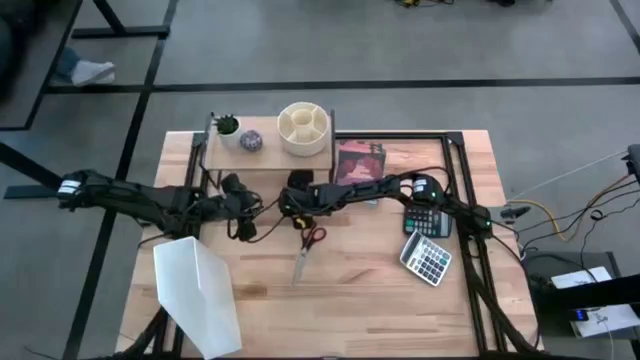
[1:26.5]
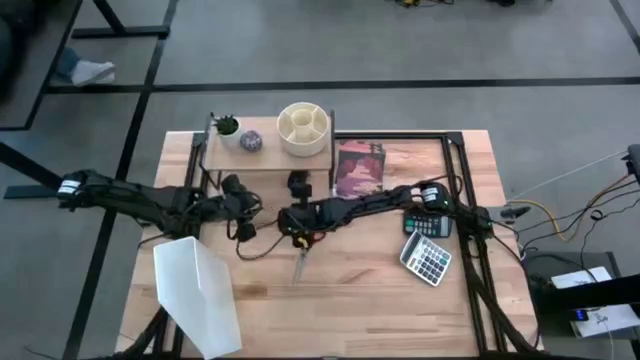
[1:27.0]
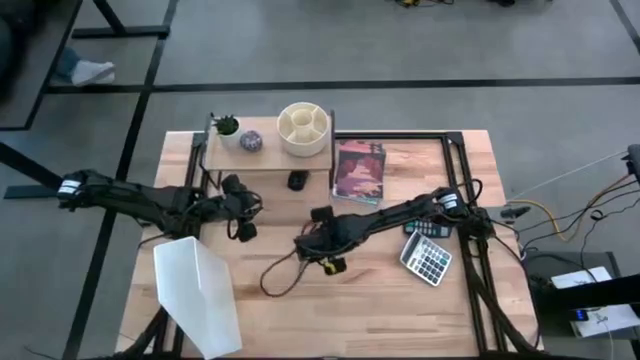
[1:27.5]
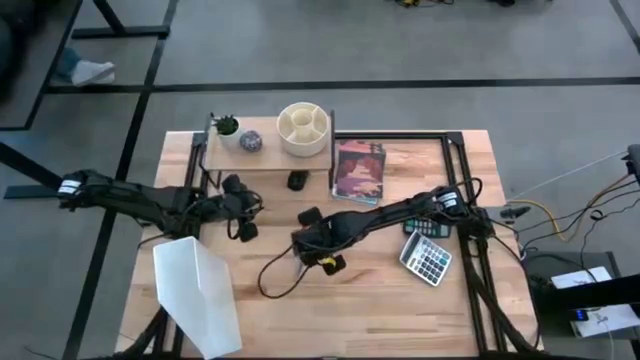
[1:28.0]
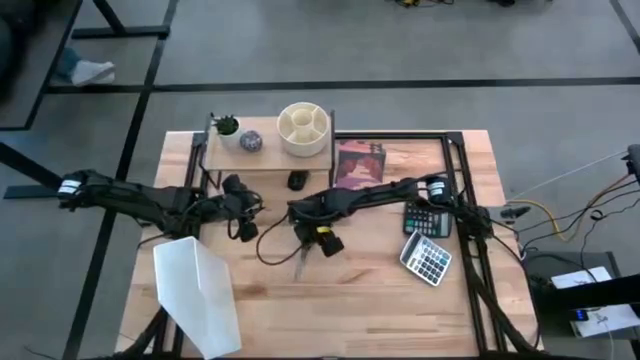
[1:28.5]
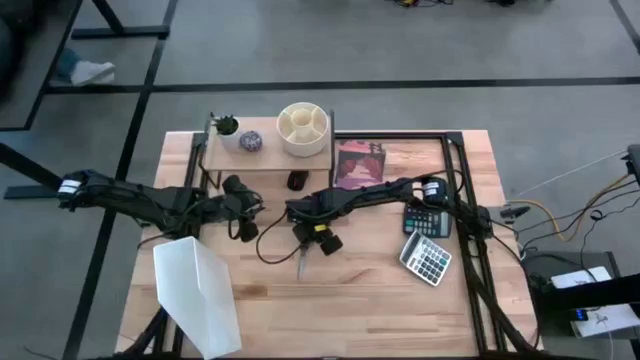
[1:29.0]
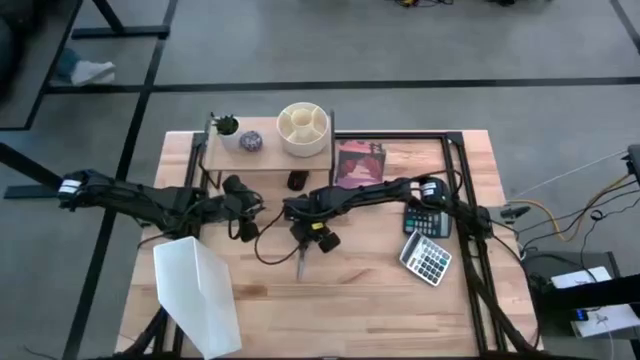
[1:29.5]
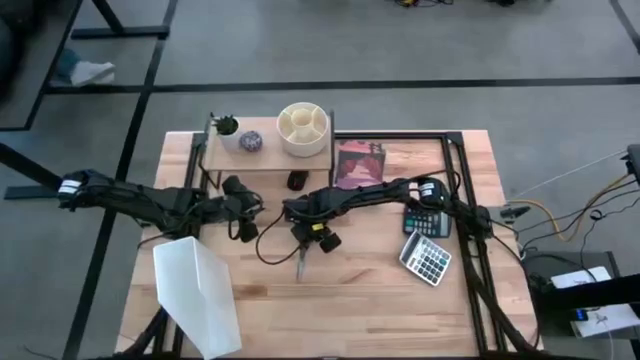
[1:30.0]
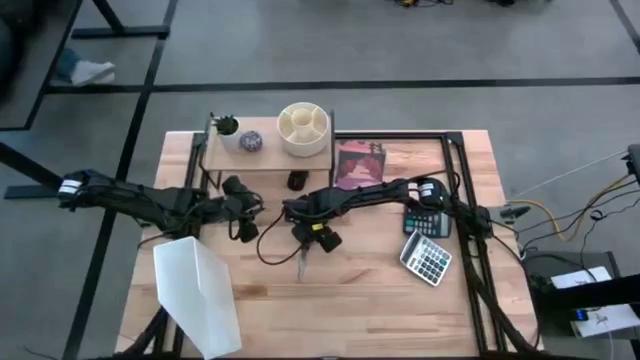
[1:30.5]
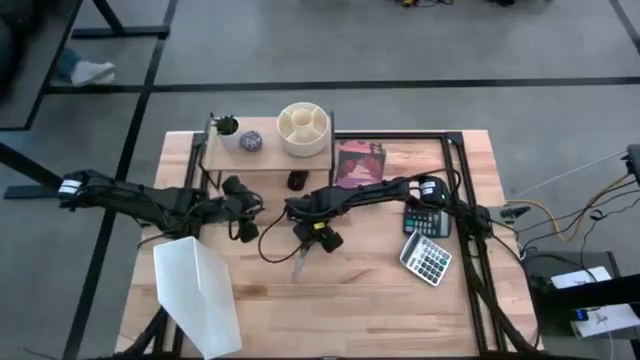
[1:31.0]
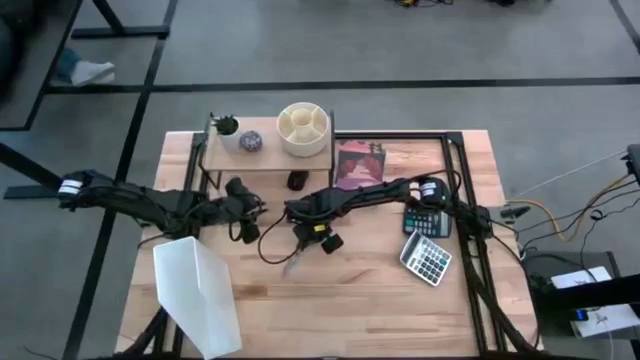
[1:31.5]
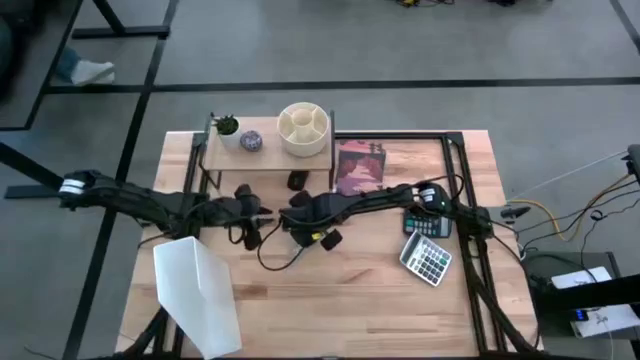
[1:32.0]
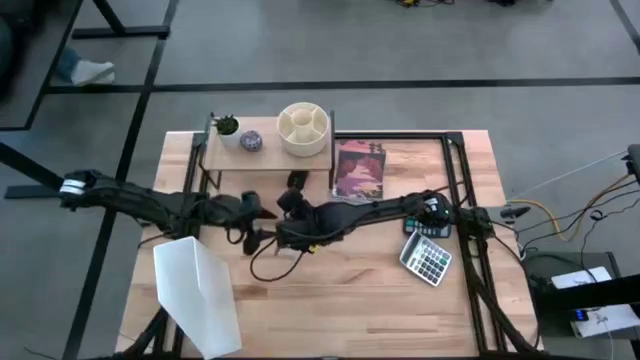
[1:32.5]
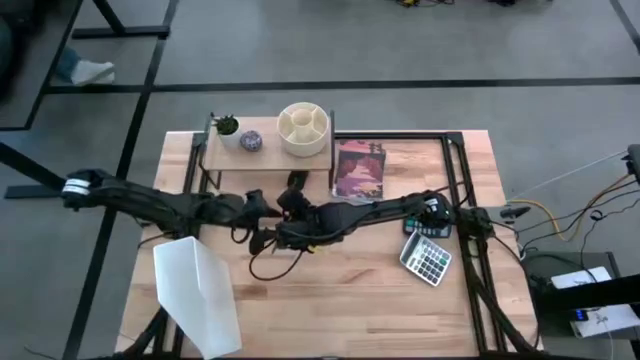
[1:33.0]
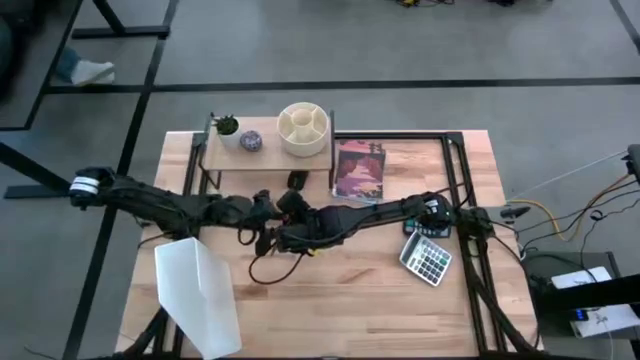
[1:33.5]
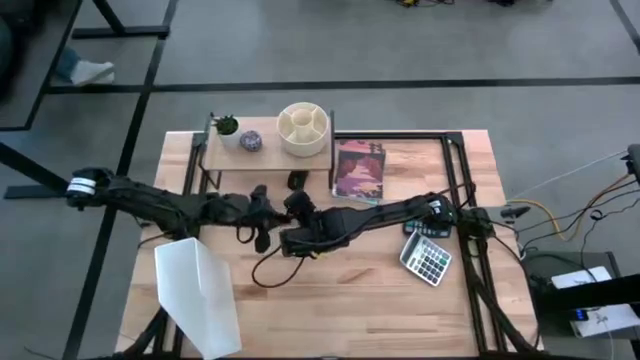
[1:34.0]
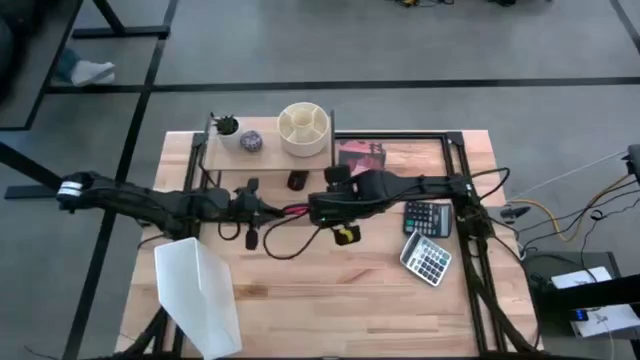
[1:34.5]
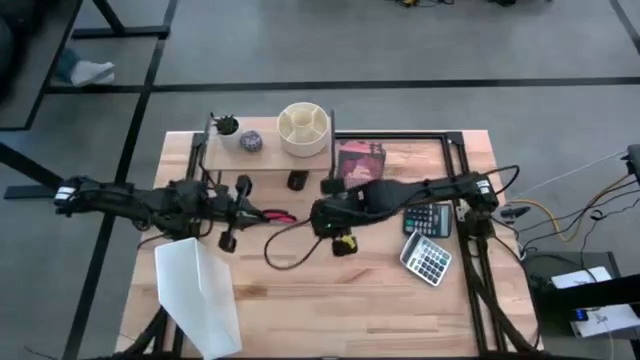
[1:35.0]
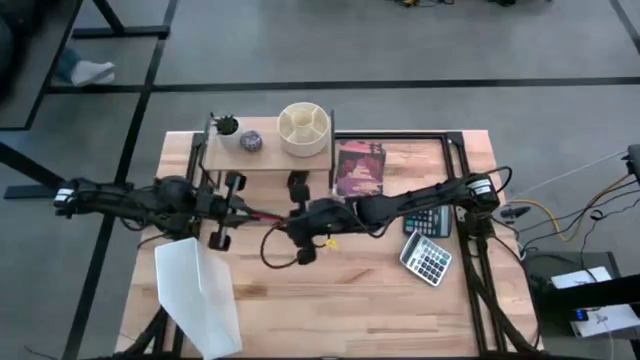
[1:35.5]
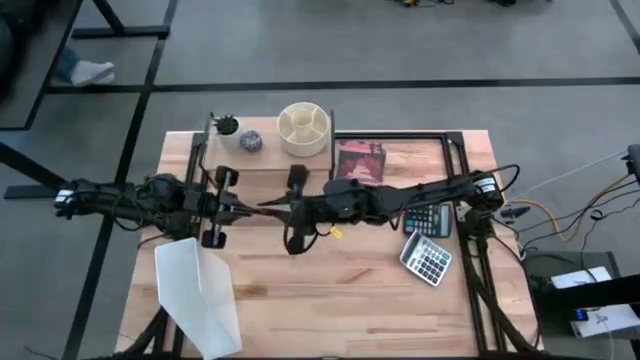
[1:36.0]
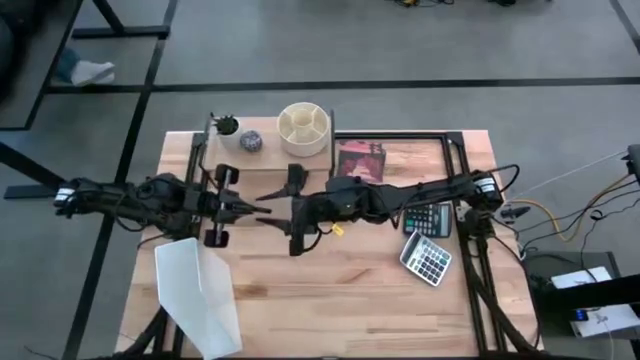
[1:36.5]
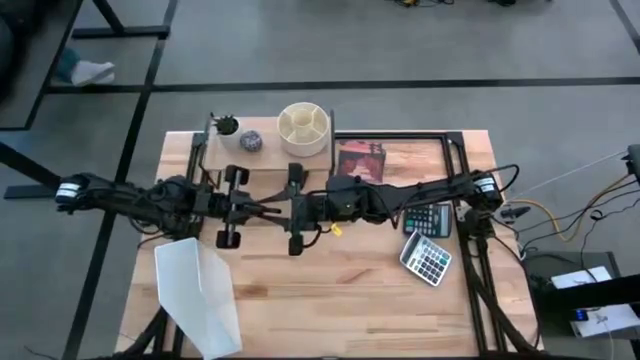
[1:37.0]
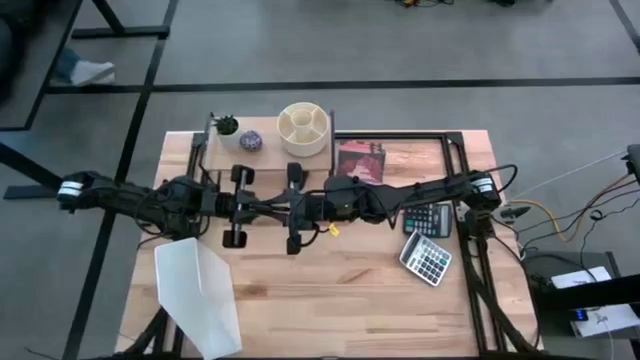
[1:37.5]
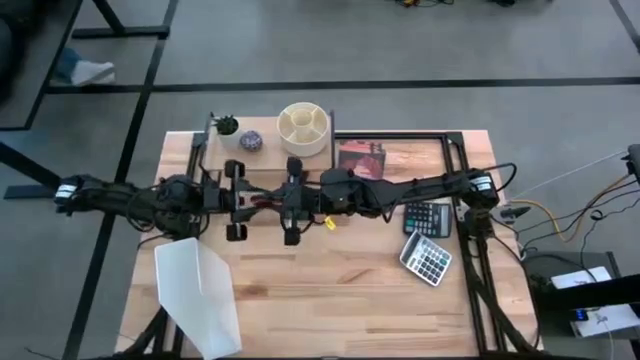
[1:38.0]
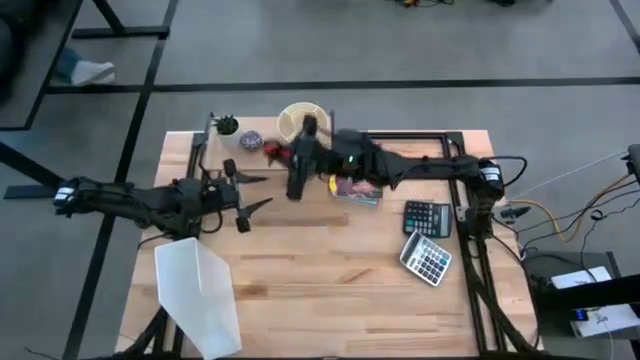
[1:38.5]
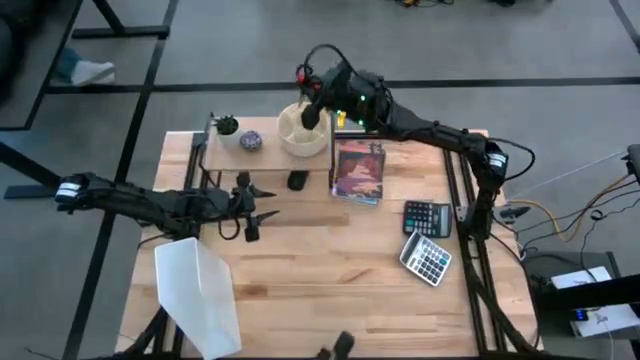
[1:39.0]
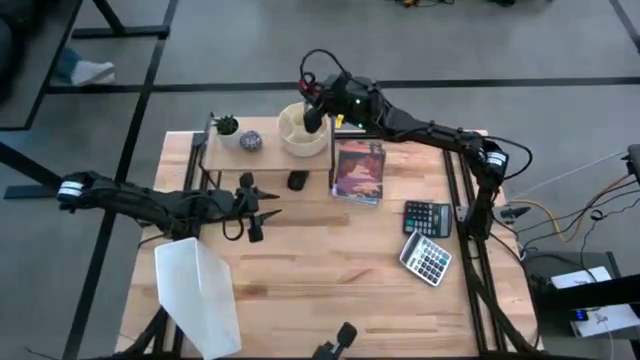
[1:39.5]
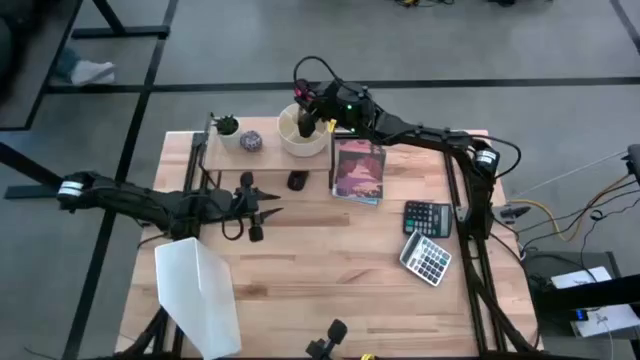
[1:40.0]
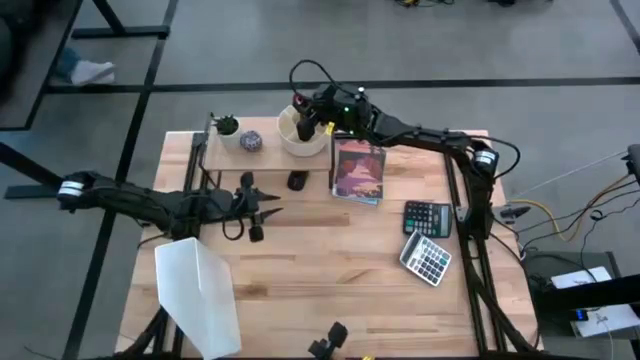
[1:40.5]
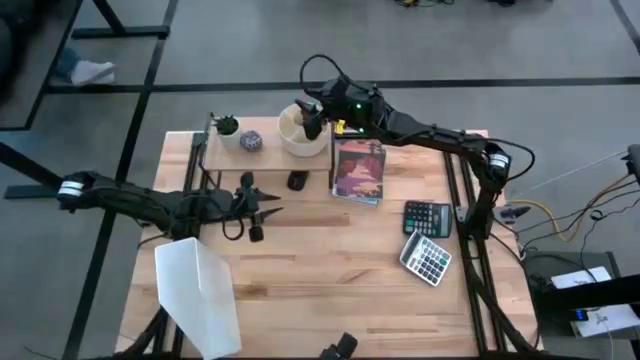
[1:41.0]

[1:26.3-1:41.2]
Task: Stock shelves
Put the black scissor into the white pen organizer on the shelf

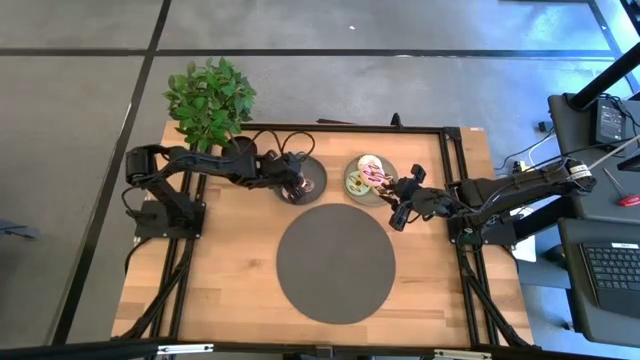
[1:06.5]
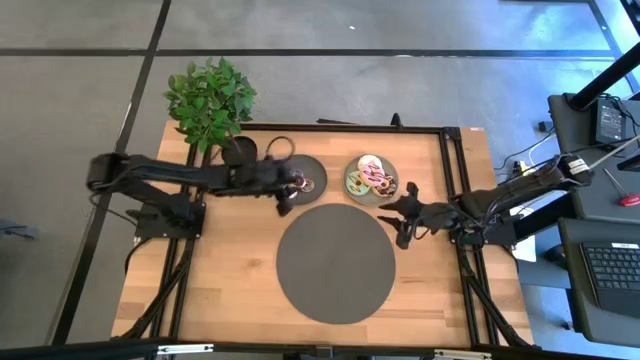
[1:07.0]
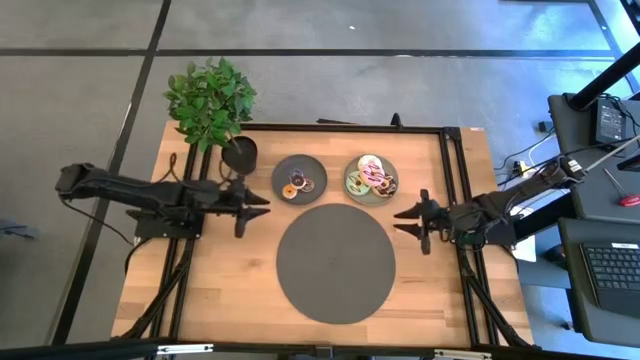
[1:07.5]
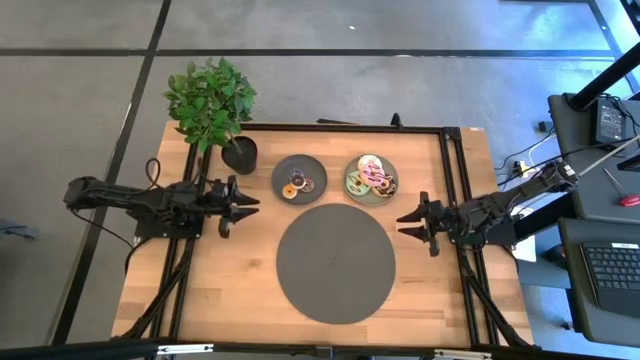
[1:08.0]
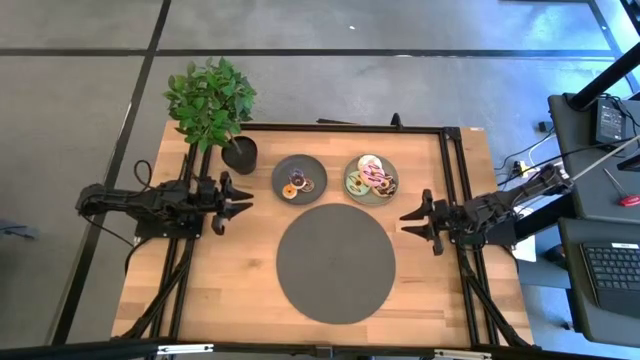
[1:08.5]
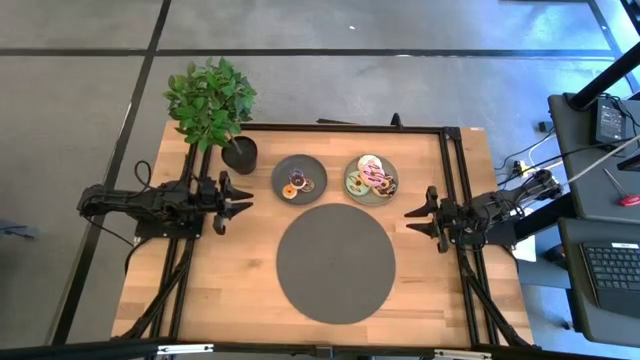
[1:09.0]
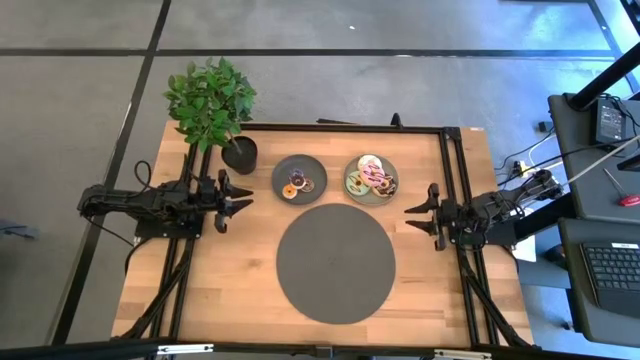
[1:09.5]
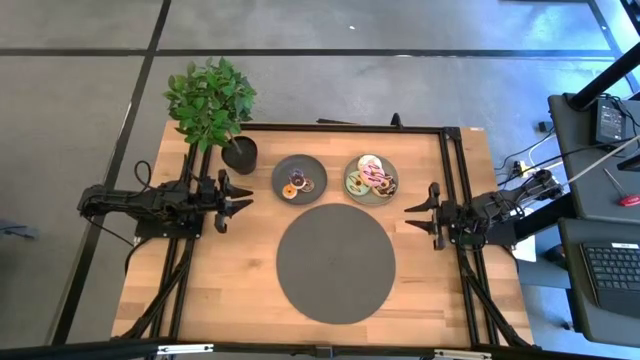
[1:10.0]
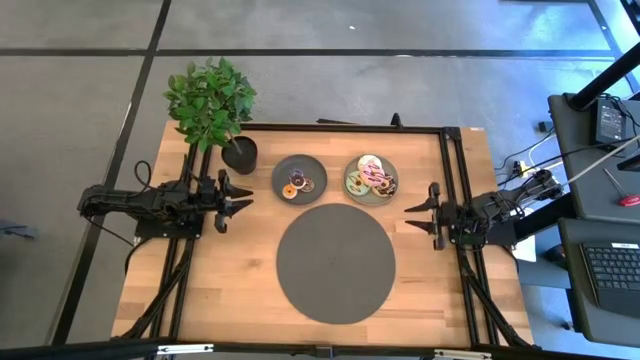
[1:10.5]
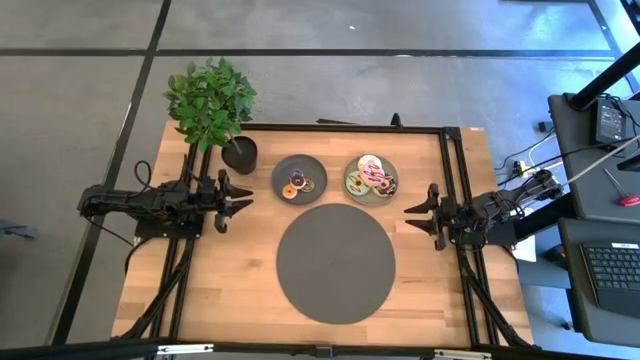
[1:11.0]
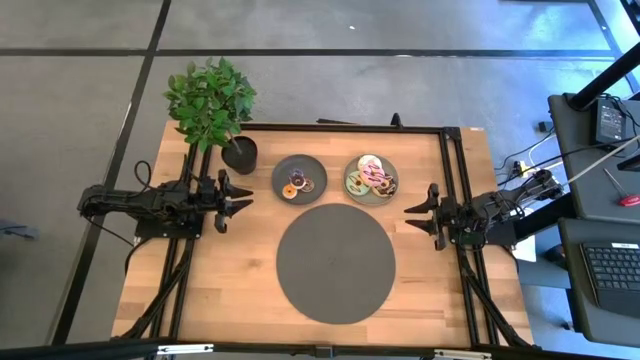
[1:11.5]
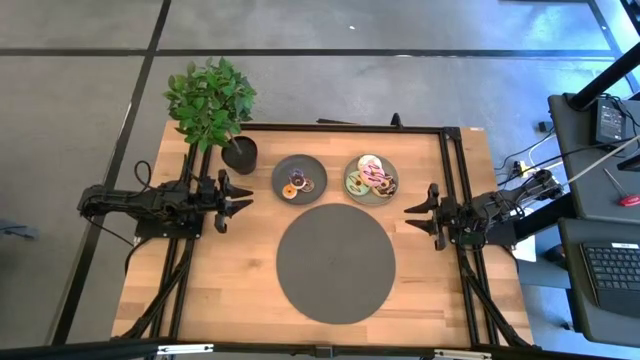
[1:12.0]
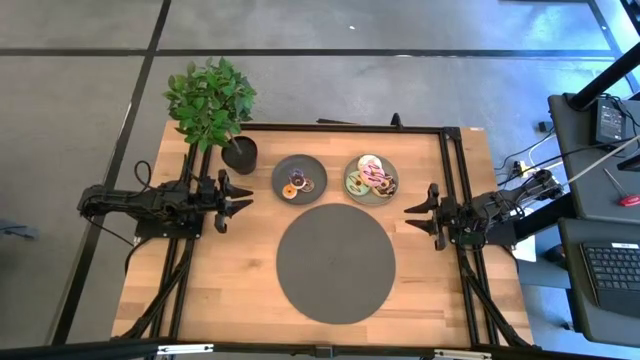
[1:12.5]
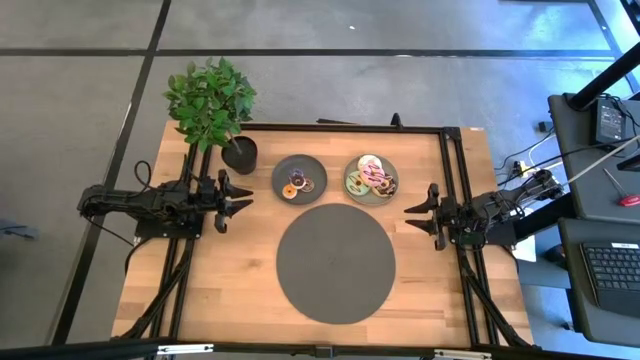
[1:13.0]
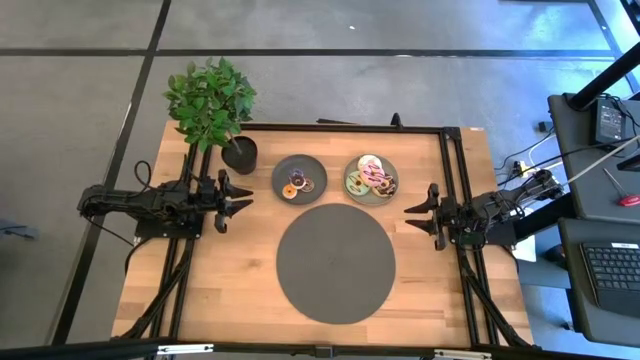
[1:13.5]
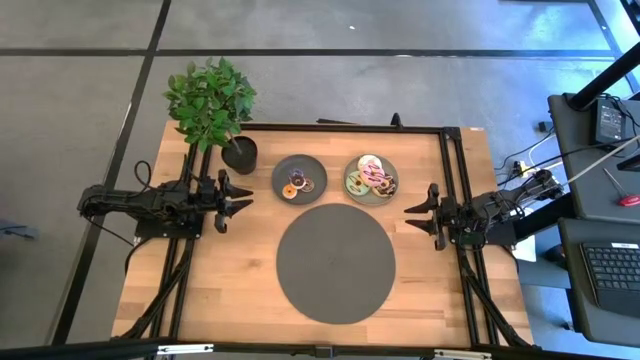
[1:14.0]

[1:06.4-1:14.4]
Task: Pick & Place donuts
Return to Home Position
